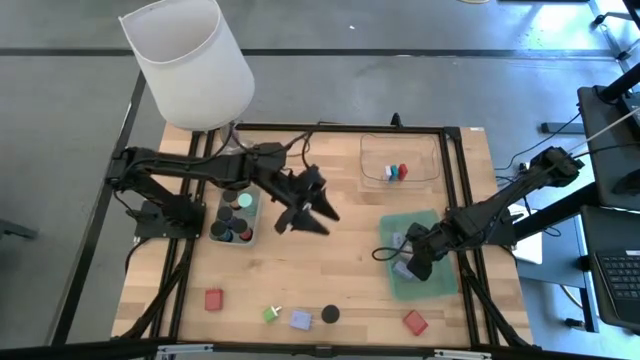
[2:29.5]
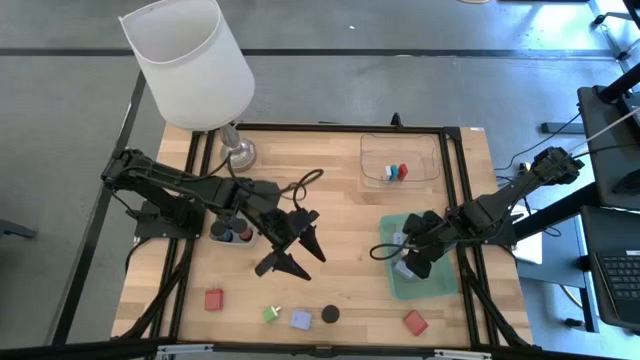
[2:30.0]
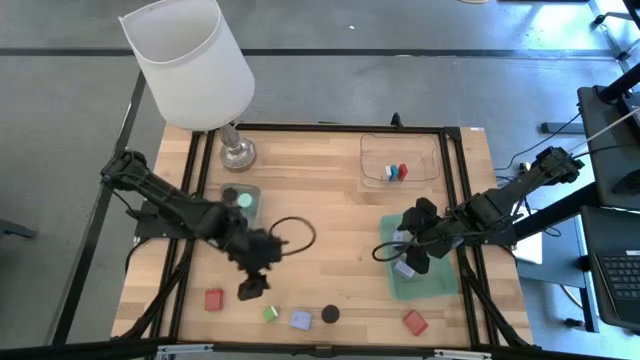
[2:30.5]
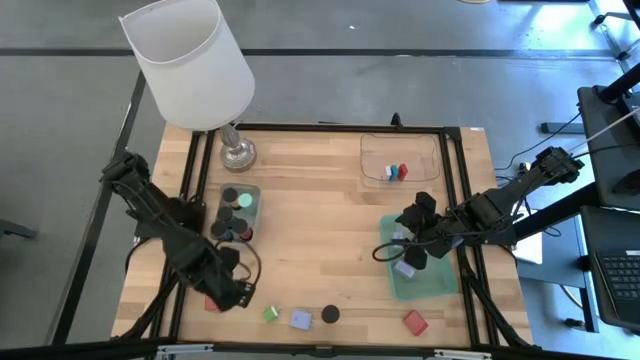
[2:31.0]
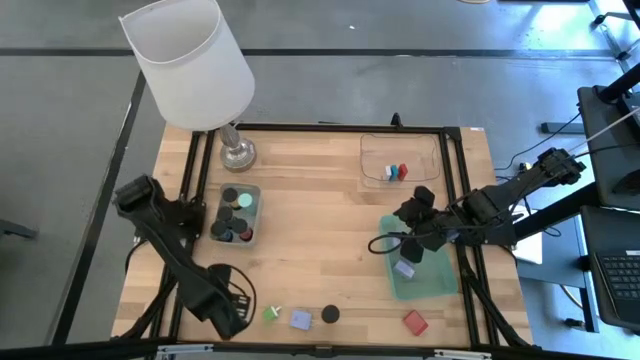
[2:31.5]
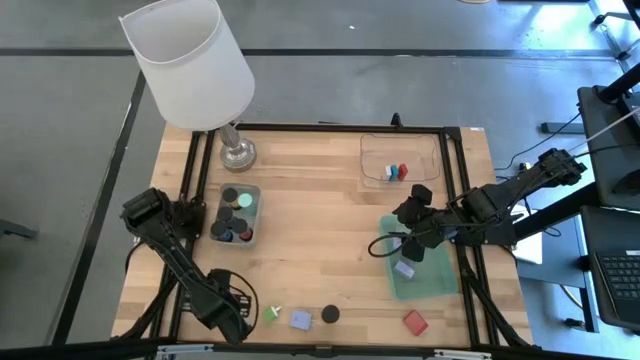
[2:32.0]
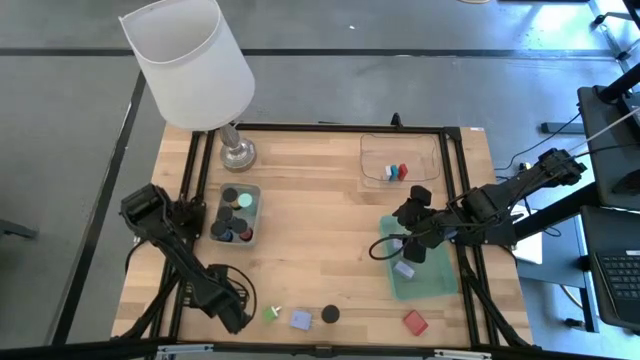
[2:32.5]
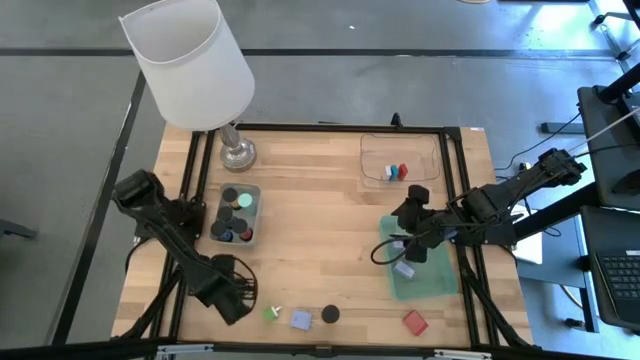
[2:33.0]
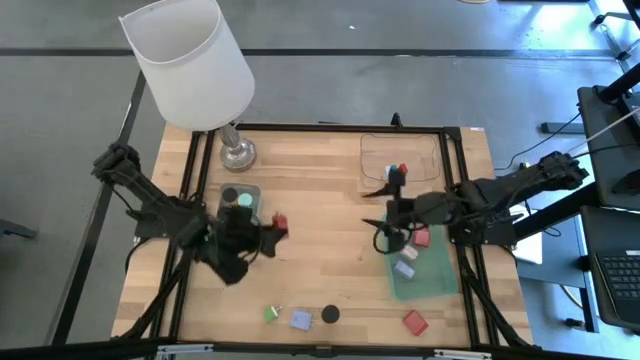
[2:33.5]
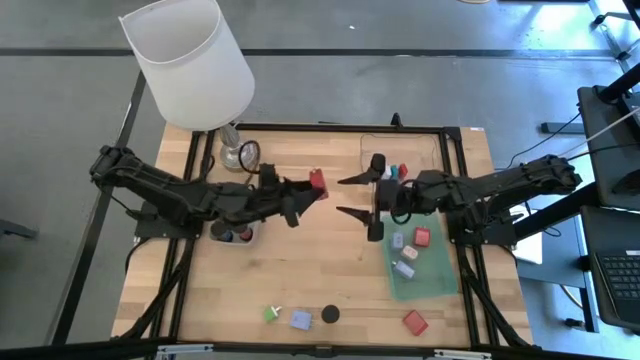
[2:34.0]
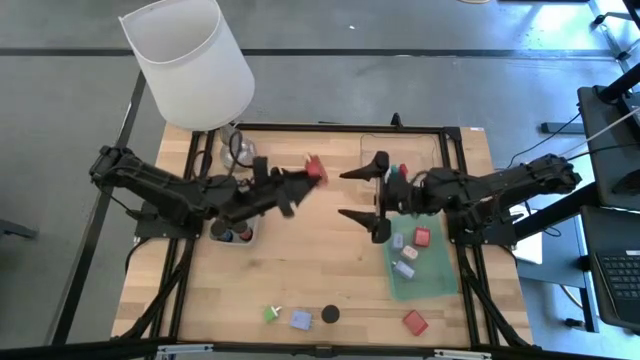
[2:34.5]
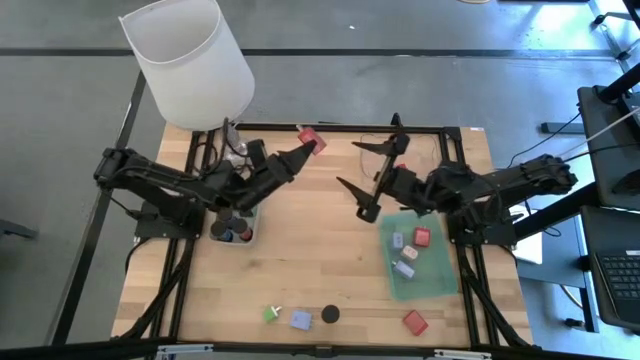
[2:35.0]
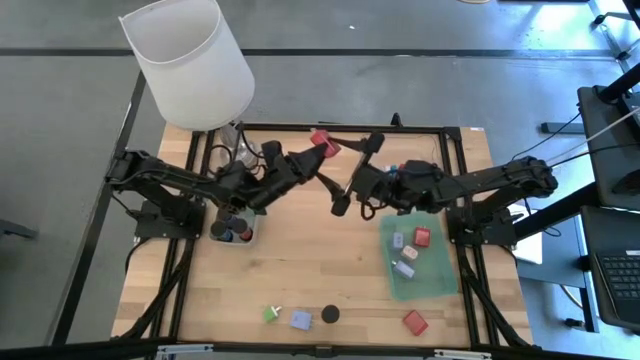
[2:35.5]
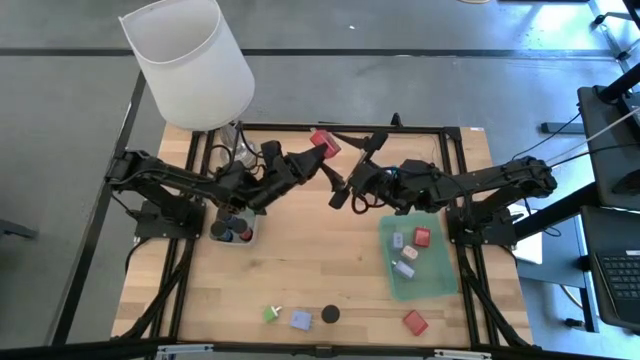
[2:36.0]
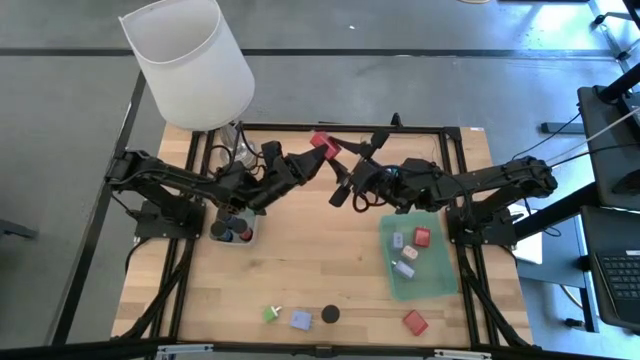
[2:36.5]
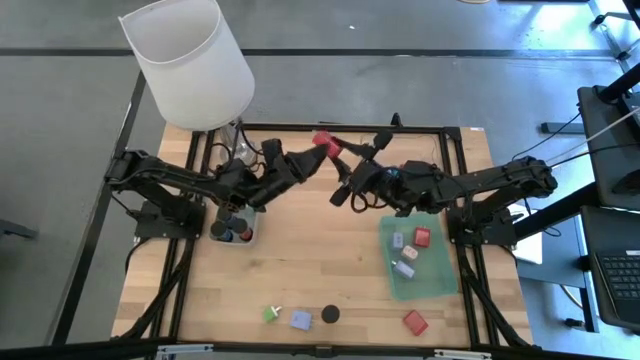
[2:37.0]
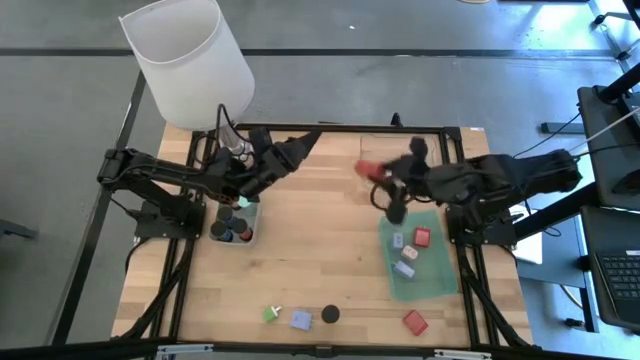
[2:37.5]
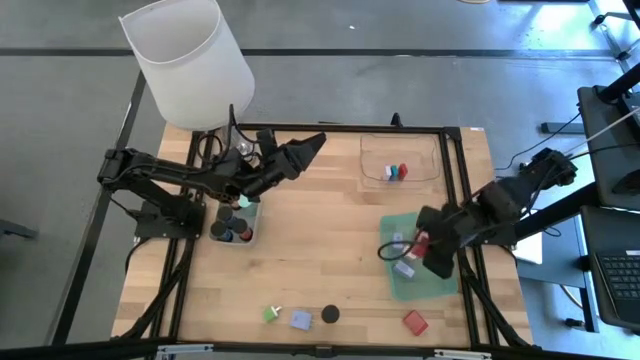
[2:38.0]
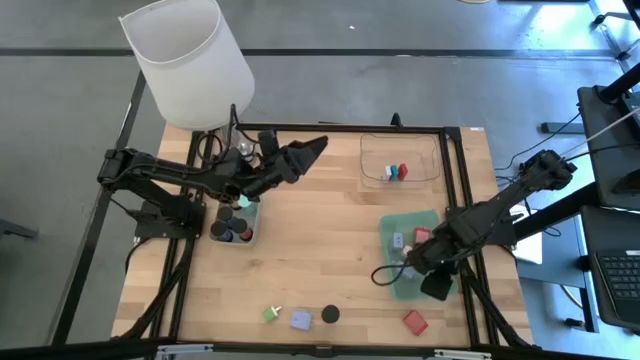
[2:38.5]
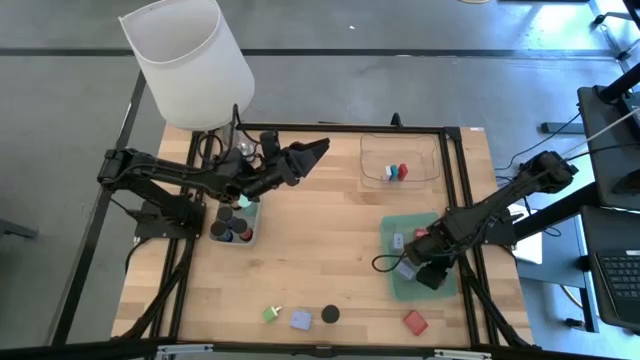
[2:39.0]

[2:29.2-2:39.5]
Task: Pick & Place Office items
Put the left red charger adapter into the green bin

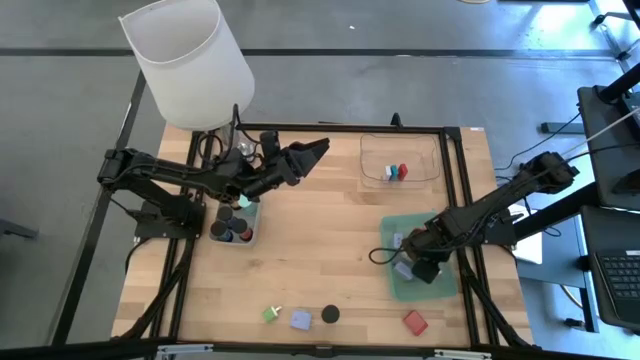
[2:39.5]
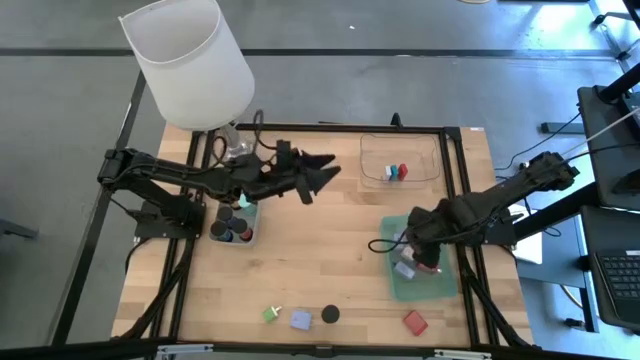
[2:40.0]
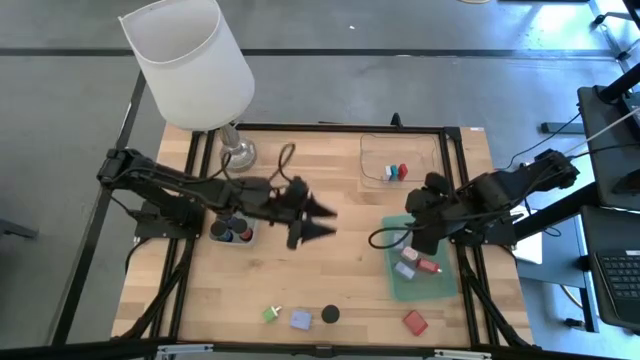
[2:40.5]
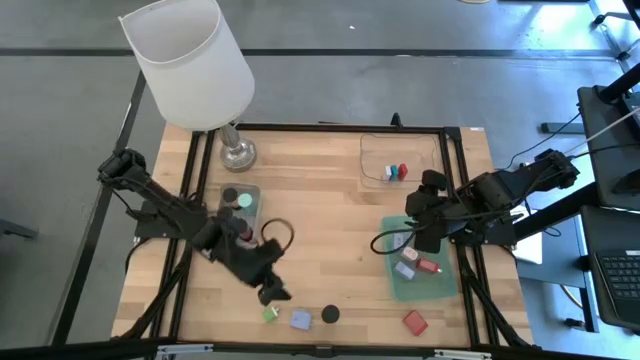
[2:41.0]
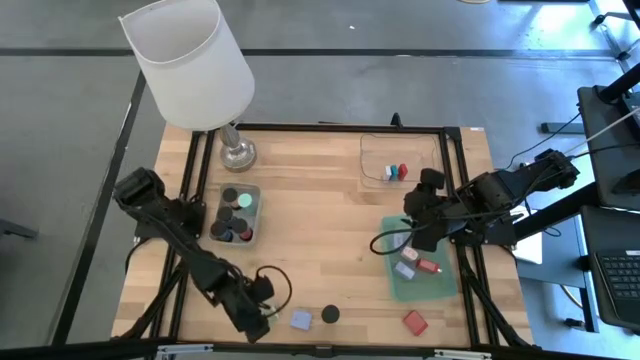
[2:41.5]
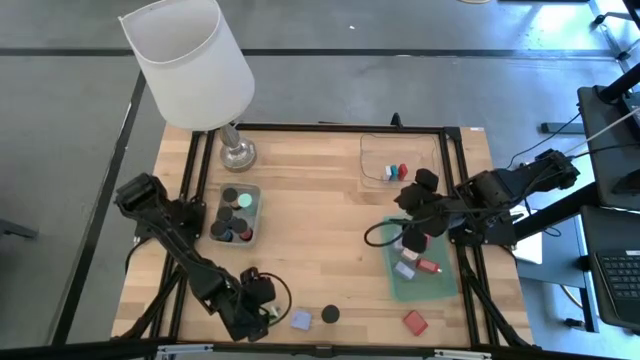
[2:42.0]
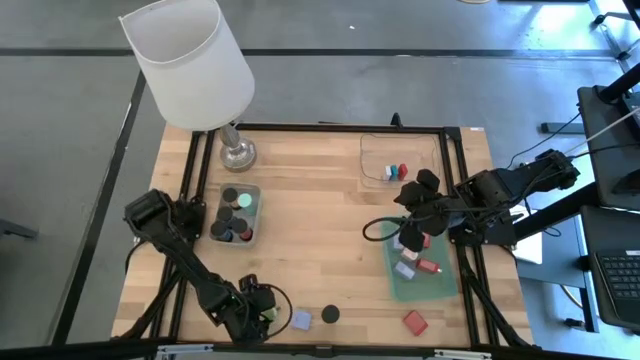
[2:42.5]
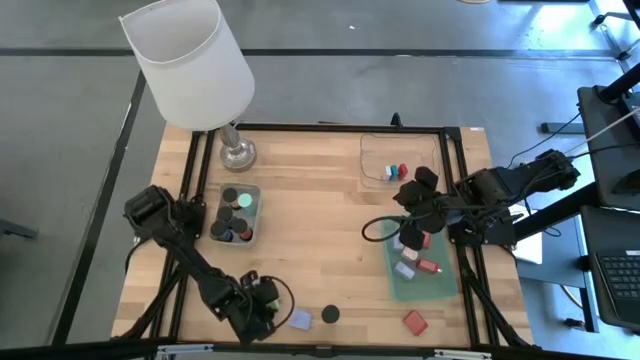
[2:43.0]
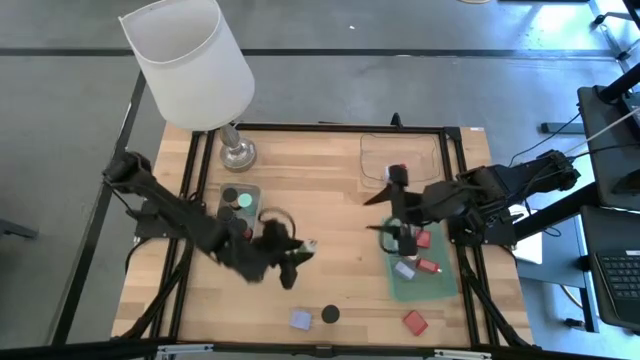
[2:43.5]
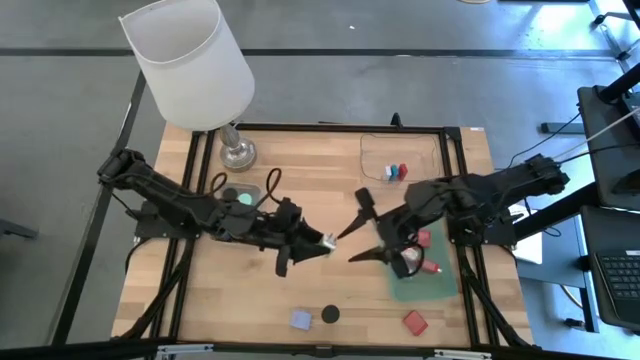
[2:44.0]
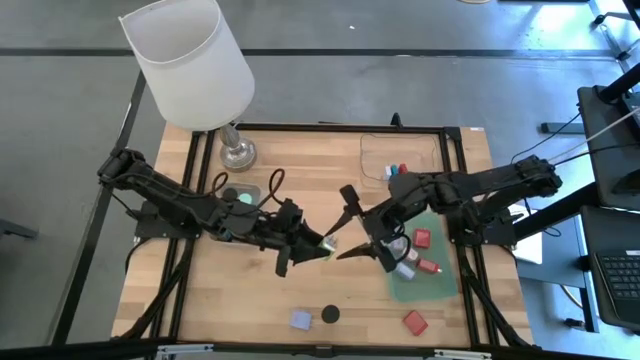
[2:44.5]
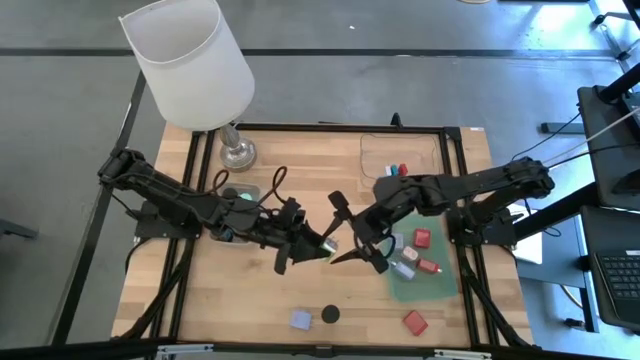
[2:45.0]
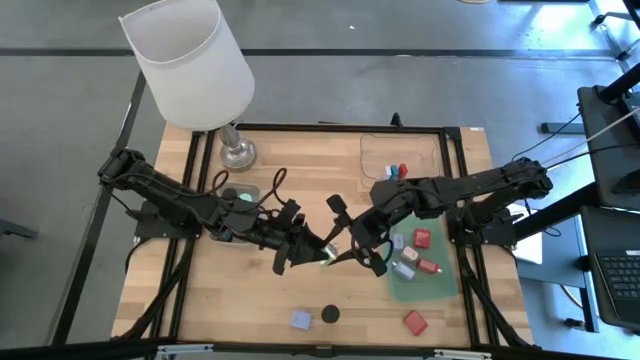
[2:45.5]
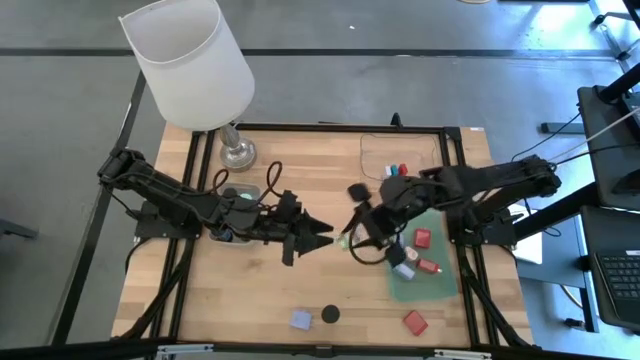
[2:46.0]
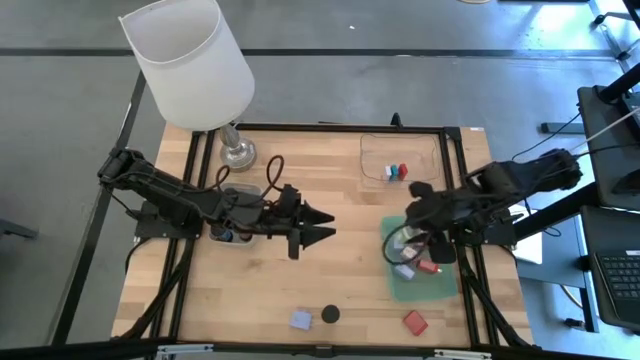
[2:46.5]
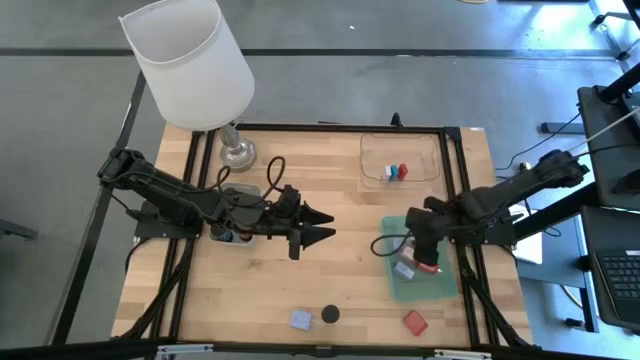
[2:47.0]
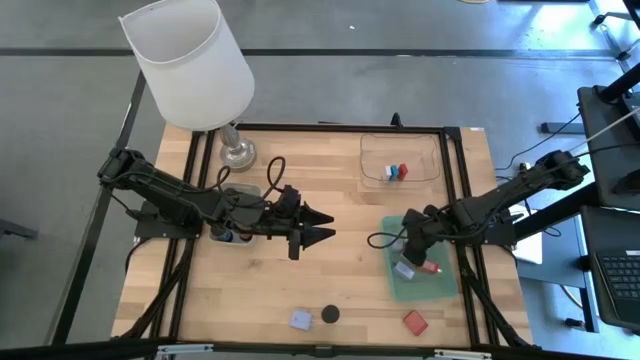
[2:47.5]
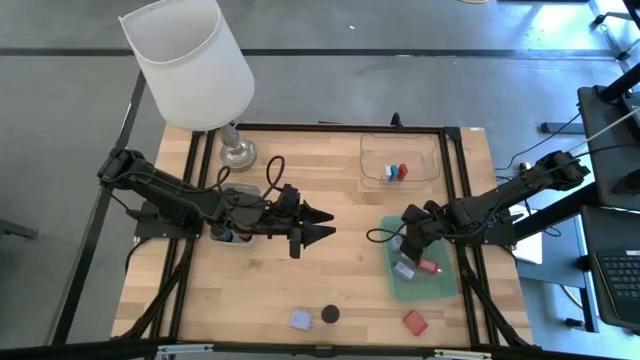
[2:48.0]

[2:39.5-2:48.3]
Put the green charger adapter into the green bin

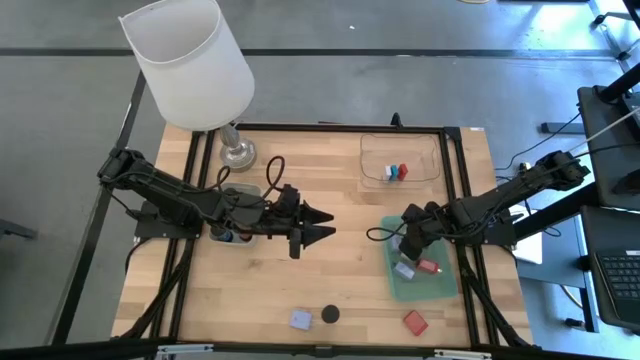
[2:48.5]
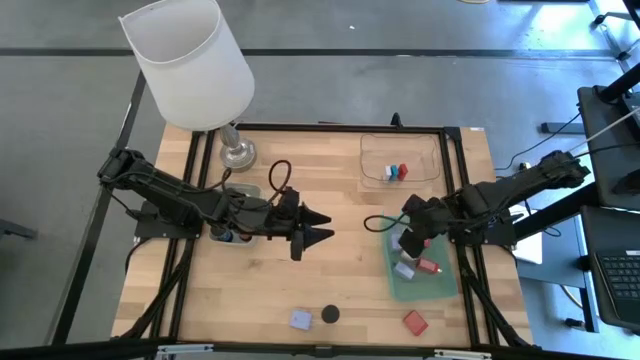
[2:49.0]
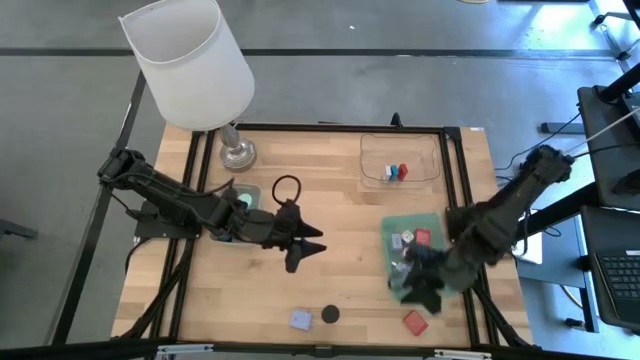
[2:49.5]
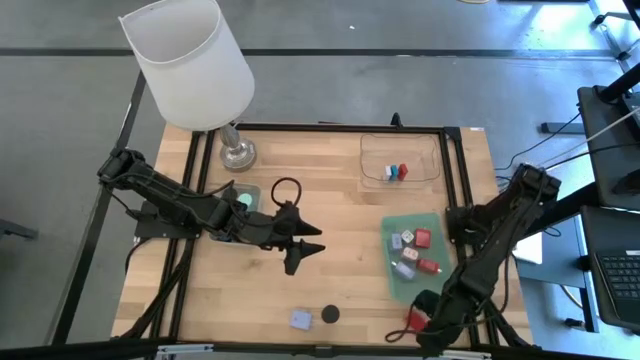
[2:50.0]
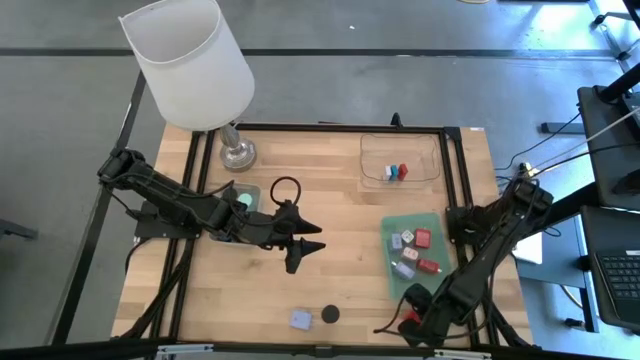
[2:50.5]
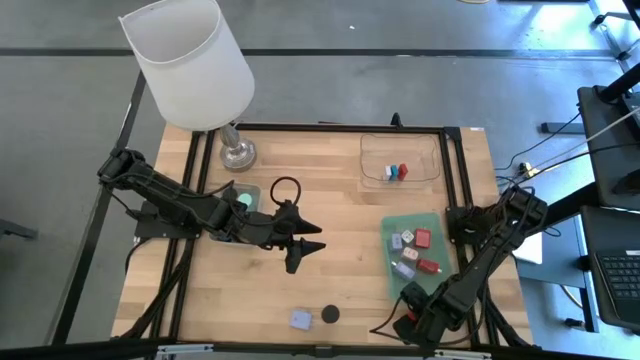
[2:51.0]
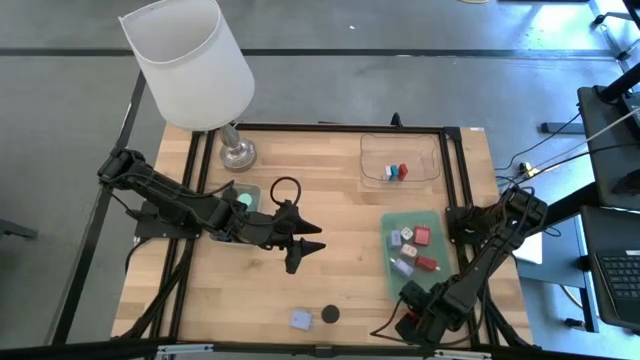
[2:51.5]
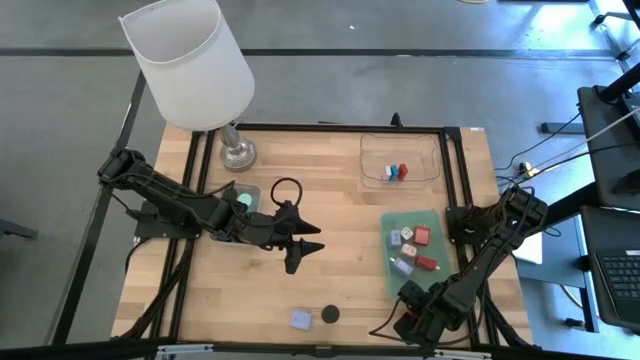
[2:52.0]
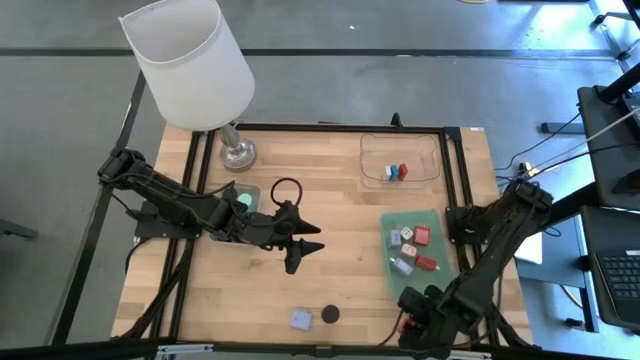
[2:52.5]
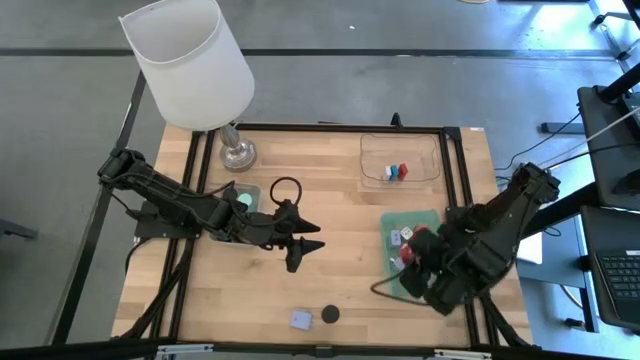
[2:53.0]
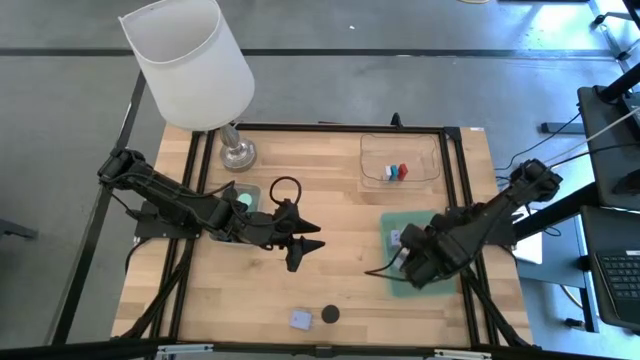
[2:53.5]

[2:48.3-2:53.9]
Put the red charger adapter into the green bin
